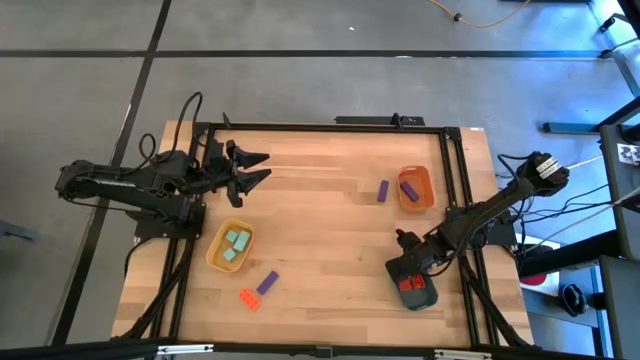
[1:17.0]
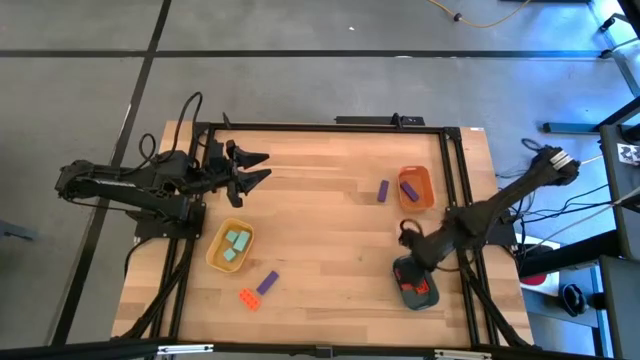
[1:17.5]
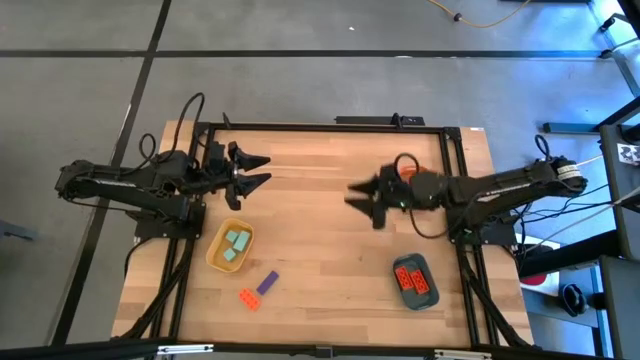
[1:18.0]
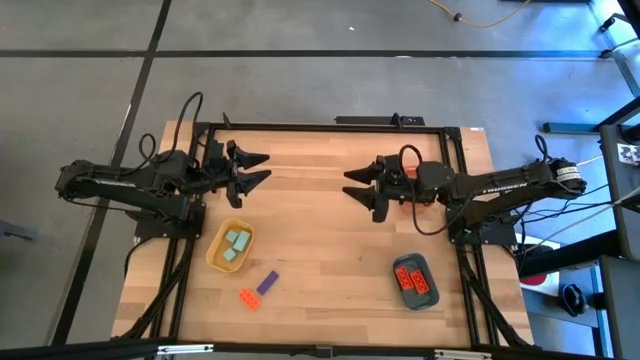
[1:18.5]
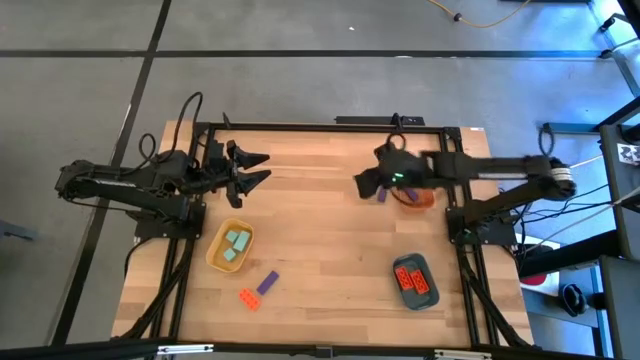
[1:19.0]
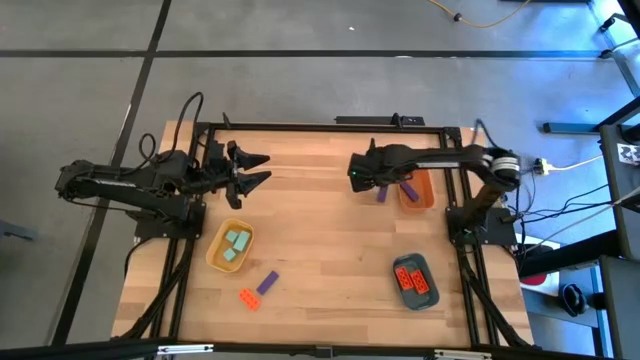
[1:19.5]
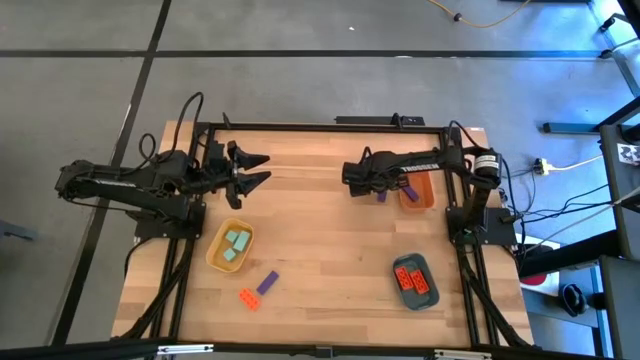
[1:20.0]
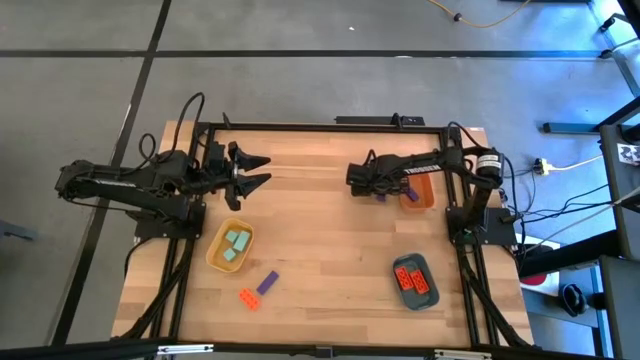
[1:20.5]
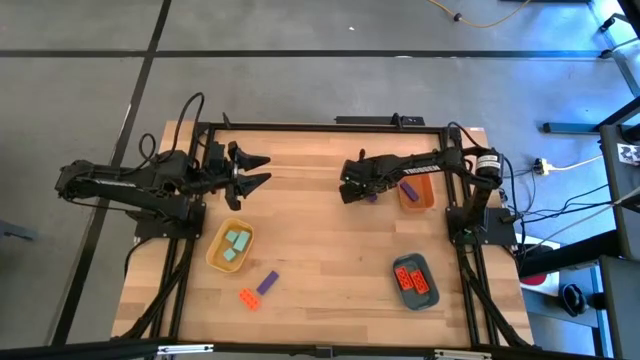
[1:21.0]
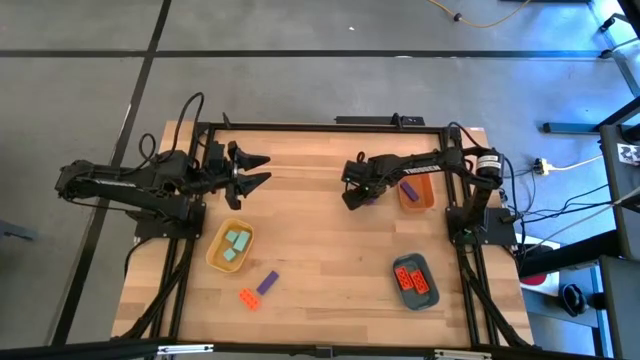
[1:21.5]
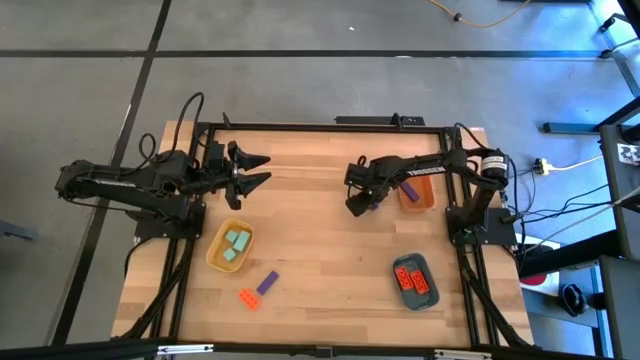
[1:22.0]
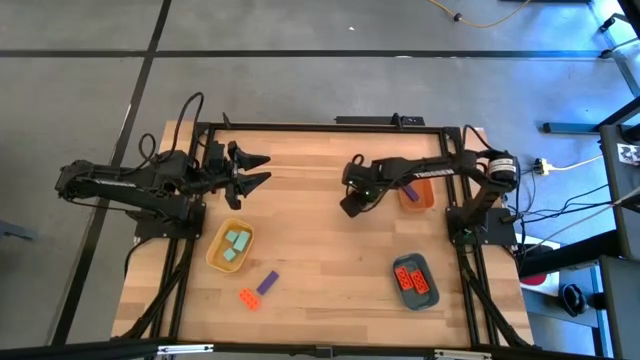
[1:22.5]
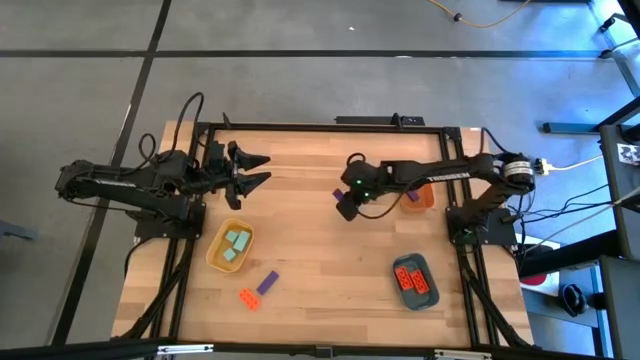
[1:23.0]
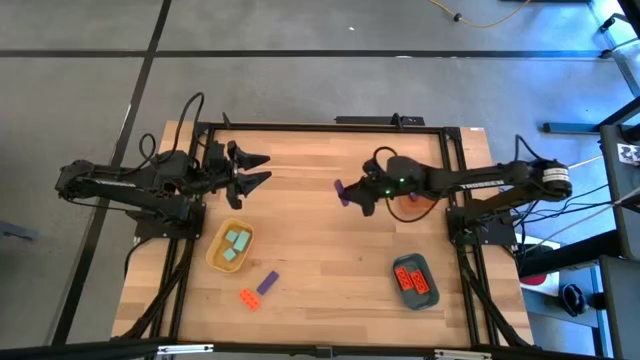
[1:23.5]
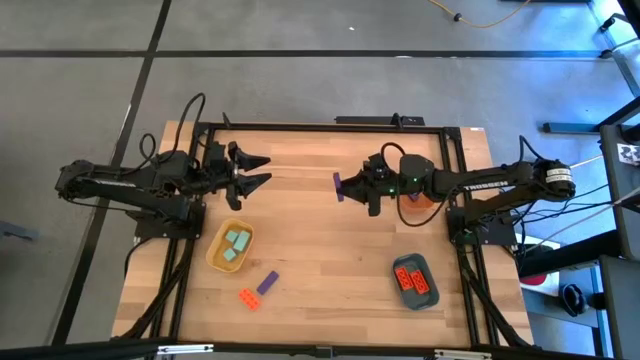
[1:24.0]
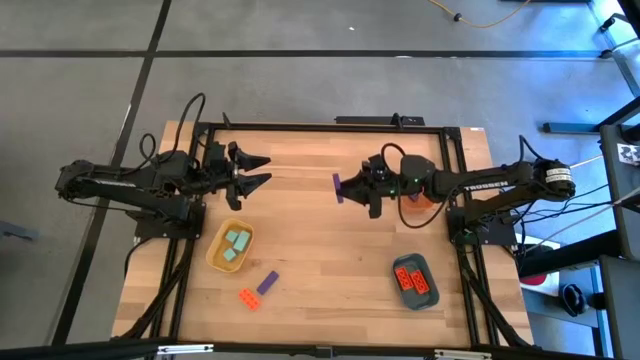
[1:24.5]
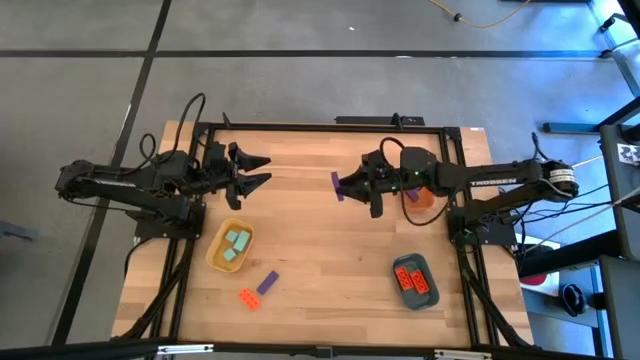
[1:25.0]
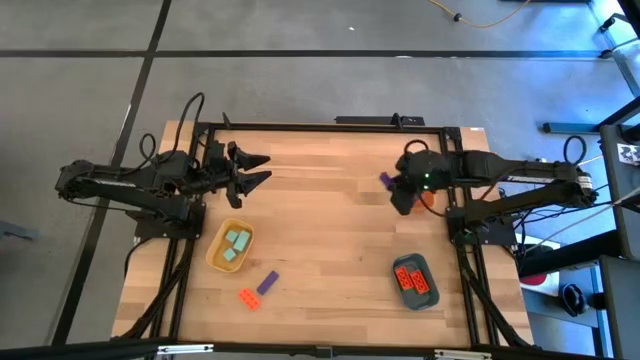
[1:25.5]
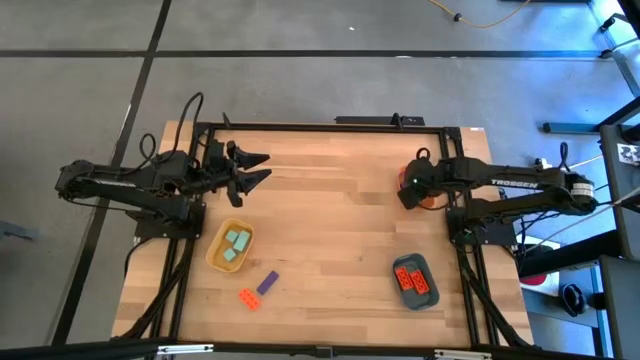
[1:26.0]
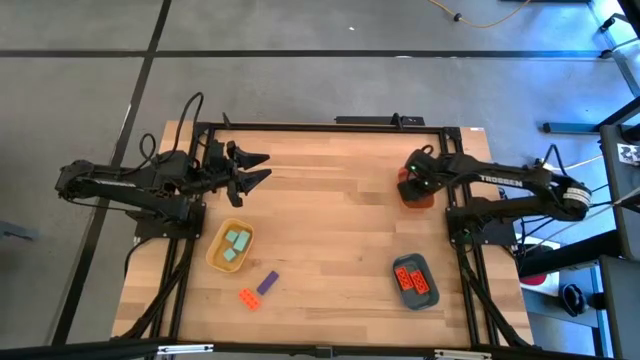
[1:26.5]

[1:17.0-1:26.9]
Task: Sort & place blocks by color
Put the top purple block into the orange bin

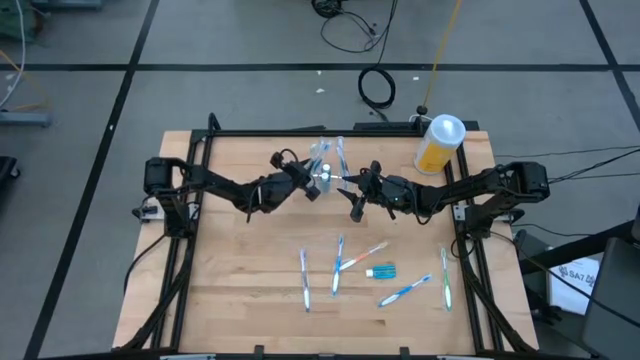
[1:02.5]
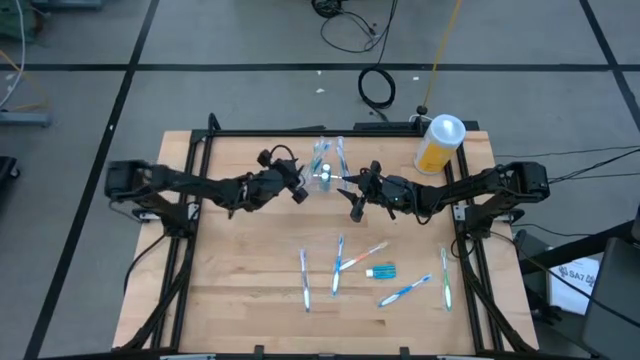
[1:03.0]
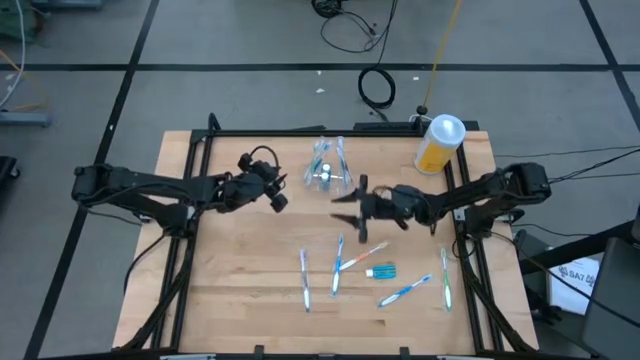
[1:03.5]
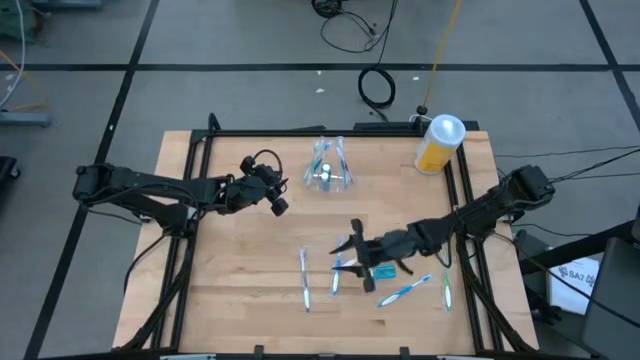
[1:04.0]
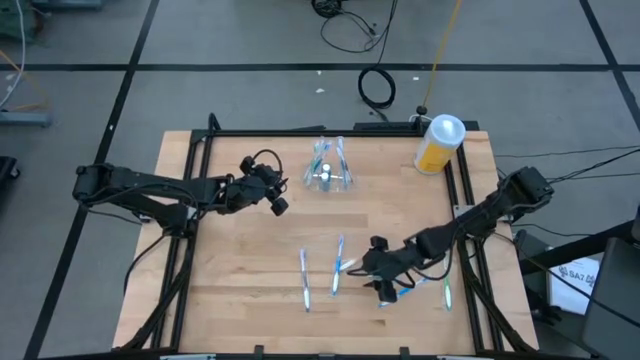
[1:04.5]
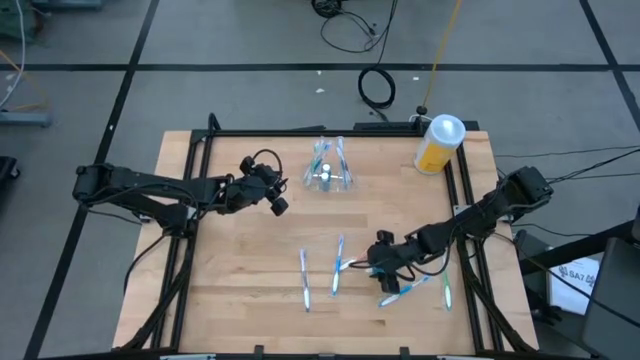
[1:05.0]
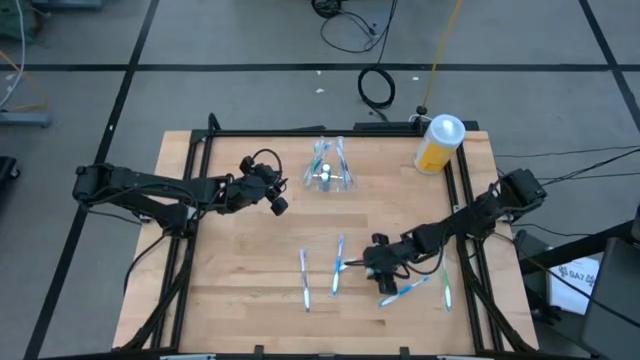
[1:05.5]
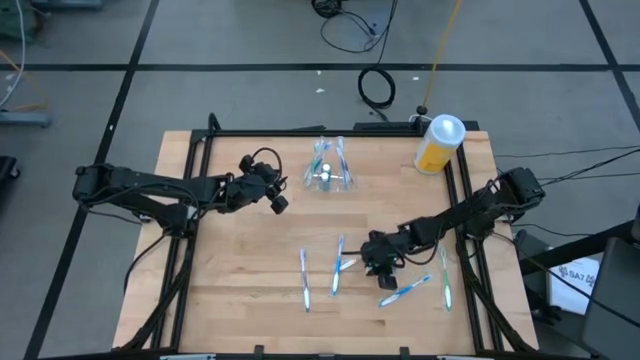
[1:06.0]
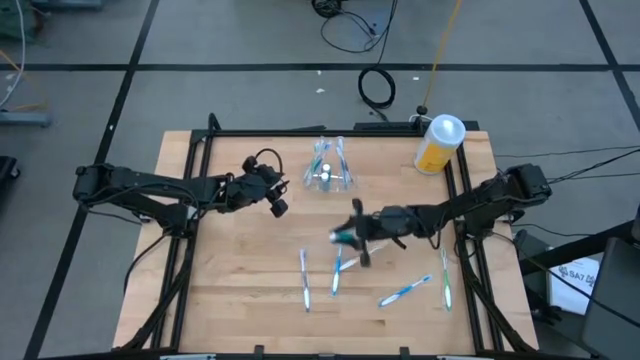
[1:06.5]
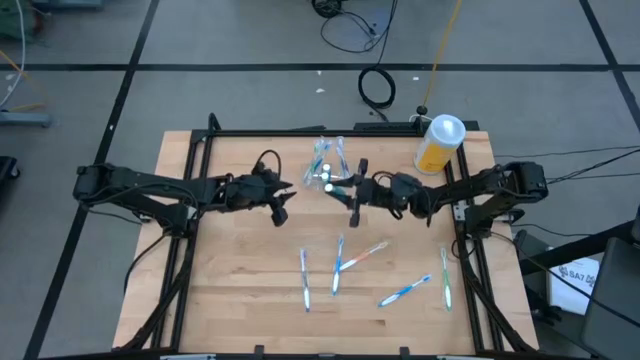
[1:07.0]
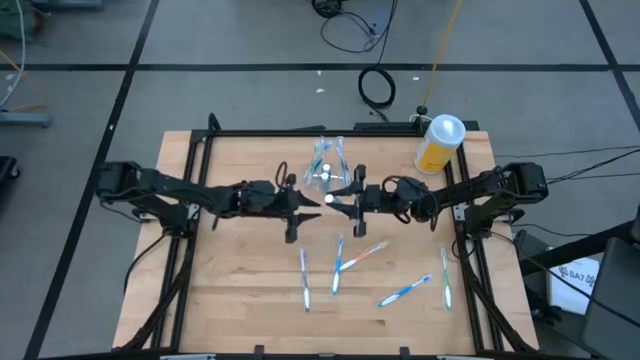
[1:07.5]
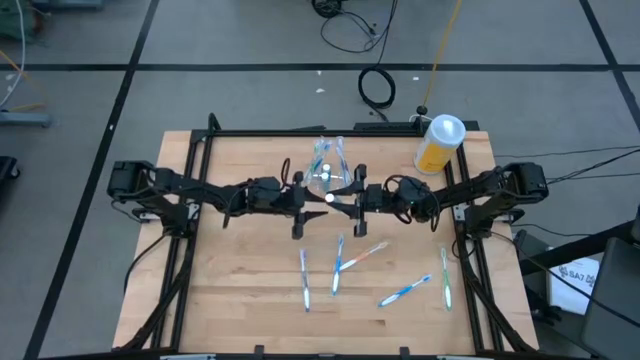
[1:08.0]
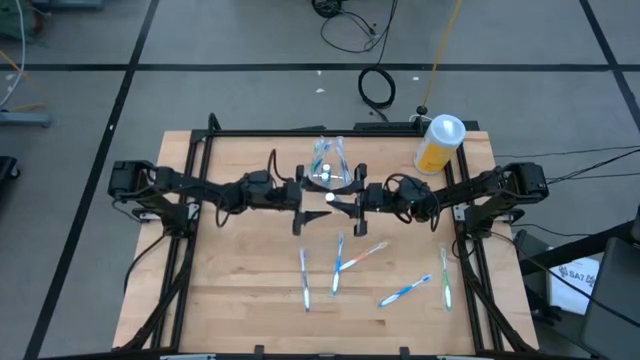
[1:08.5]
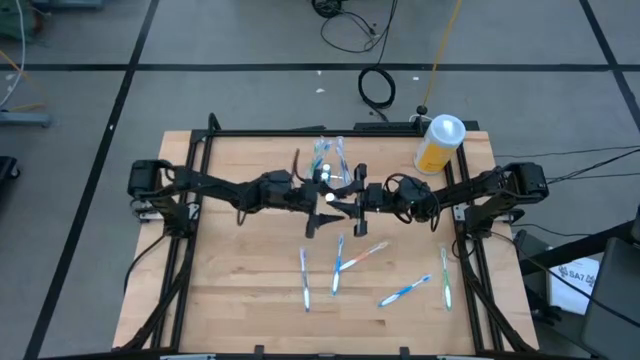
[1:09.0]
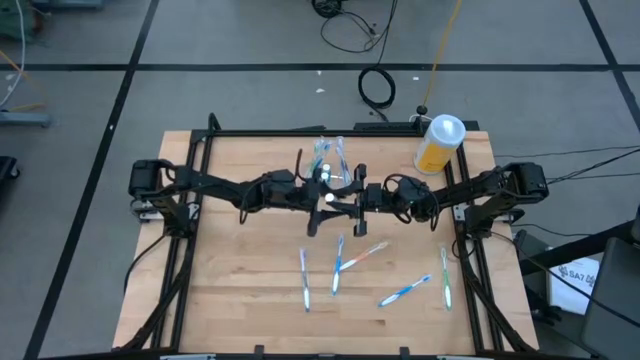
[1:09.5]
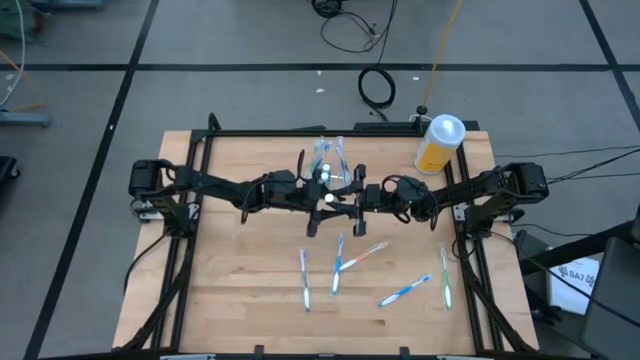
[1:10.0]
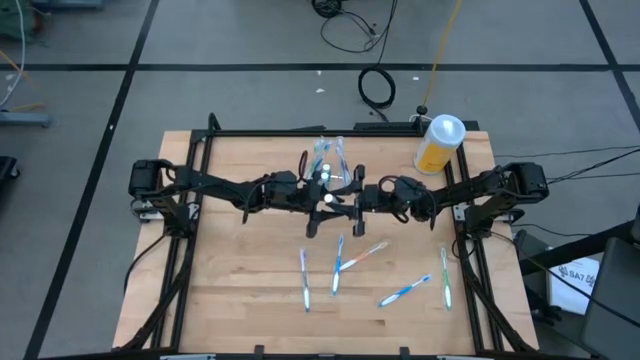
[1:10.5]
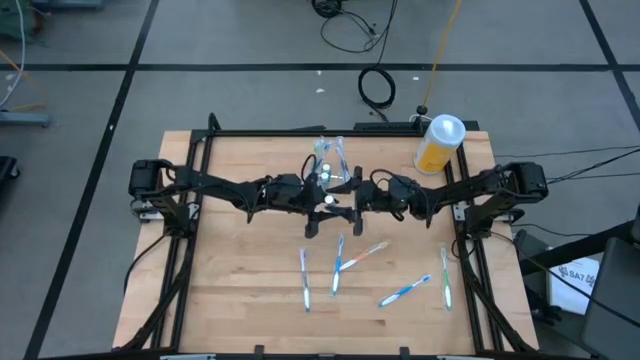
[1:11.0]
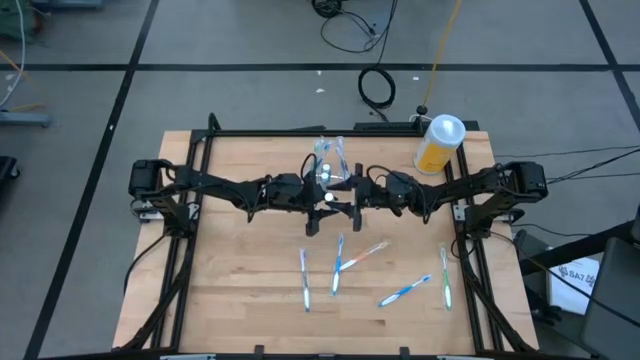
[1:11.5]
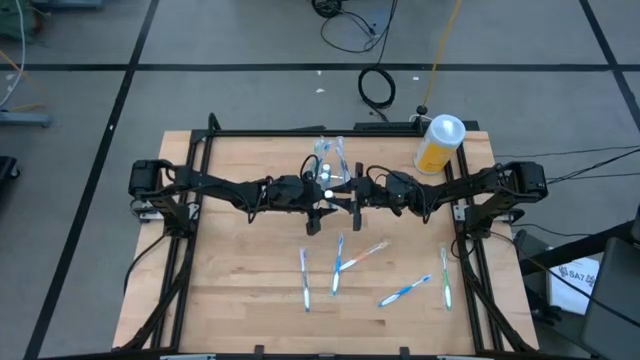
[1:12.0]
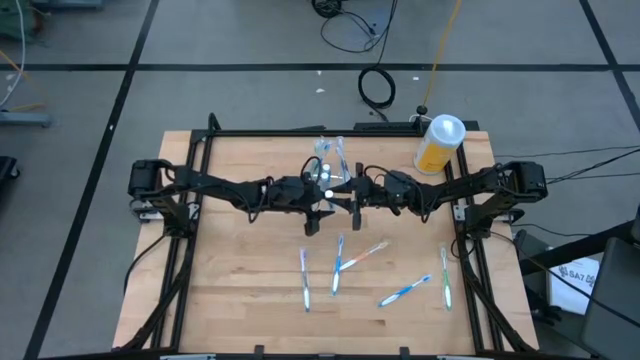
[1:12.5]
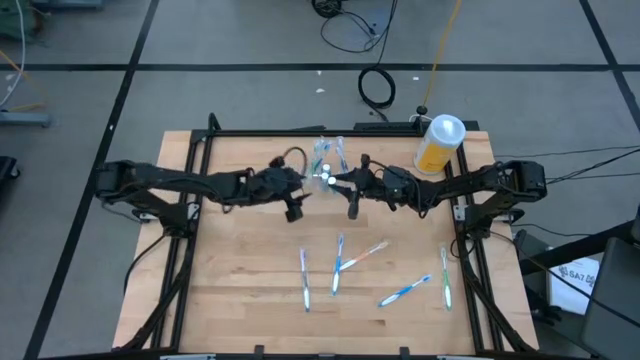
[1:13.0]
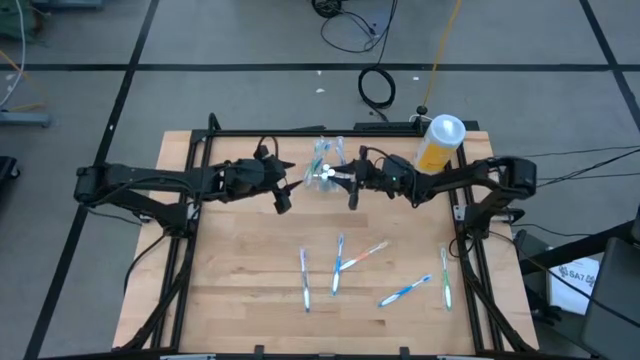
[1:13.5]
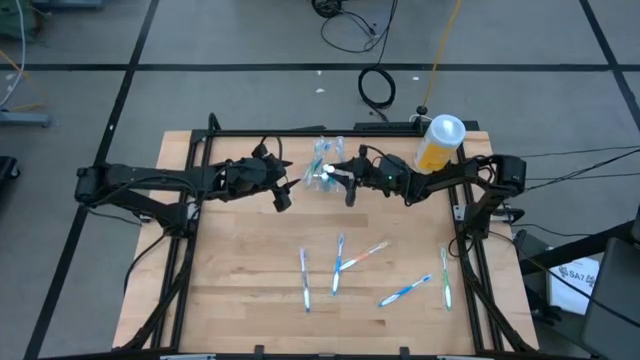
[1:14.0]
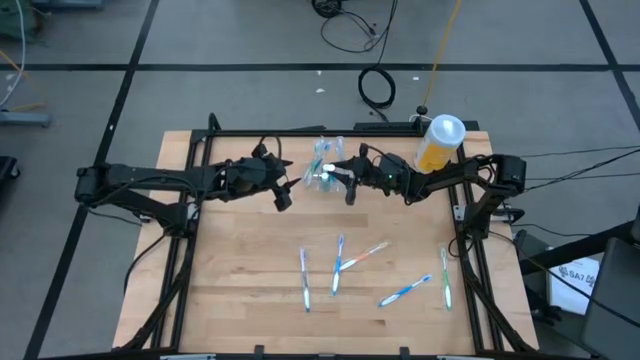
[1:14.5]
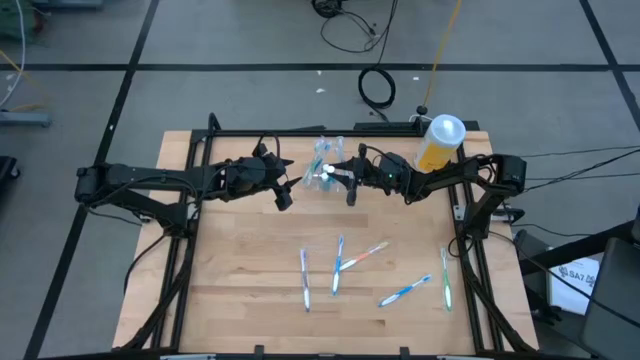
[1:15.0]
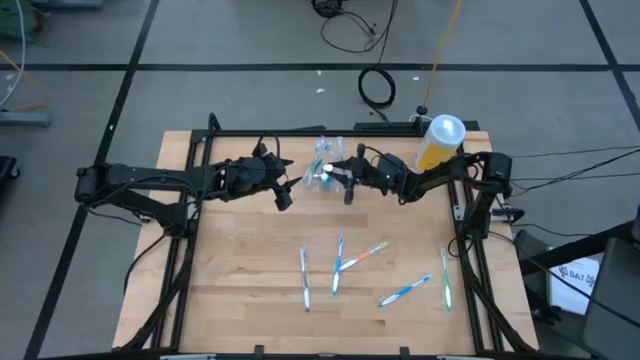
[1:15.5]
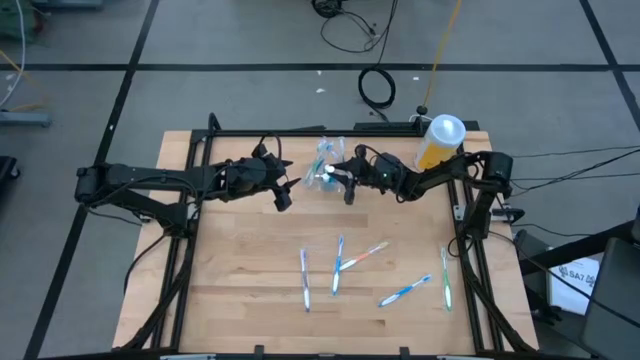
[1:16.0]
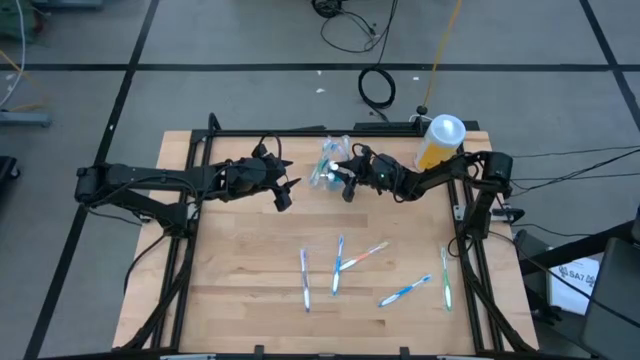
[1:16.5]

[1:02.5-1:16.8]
Task: Pick & Place toothbrushing station
Put the mouthwash into the transparent organizer
